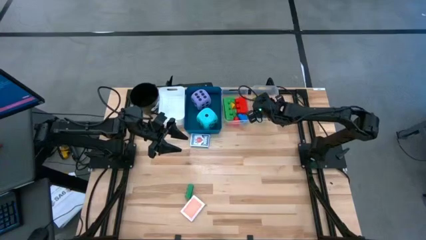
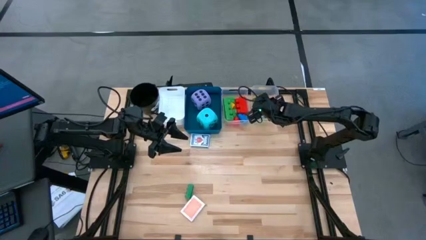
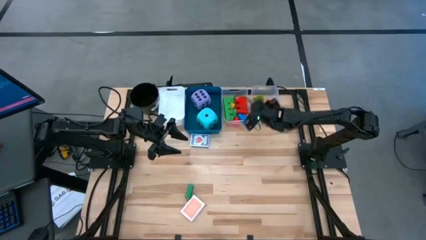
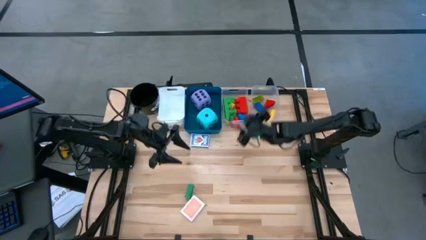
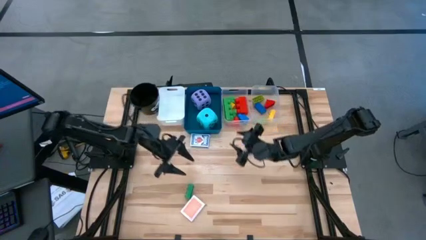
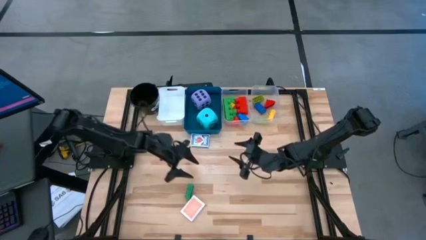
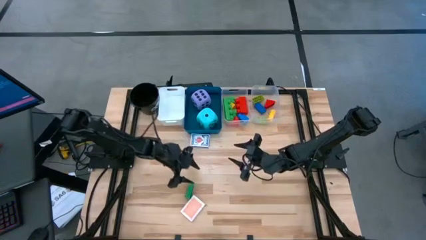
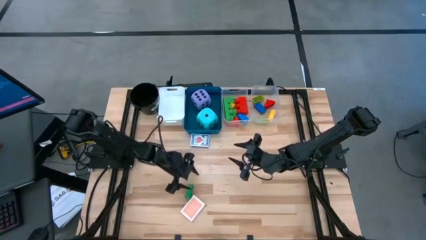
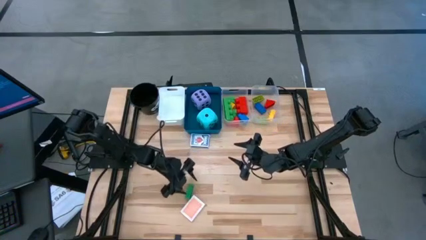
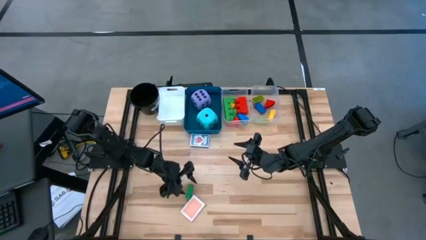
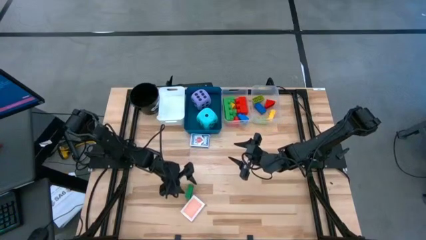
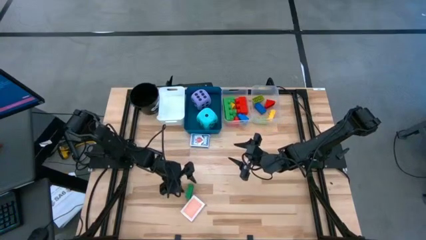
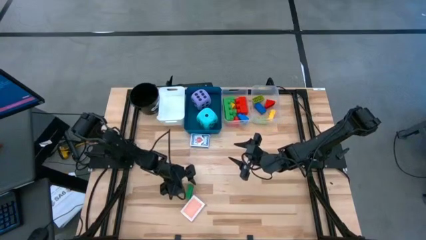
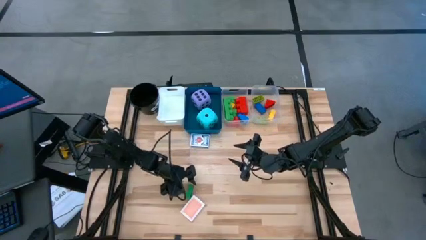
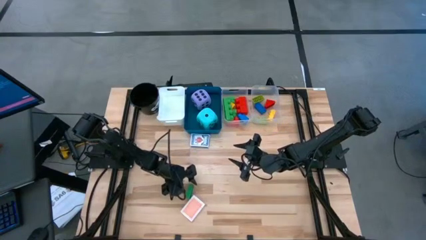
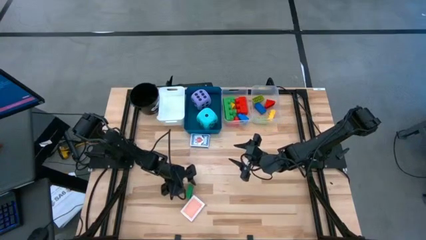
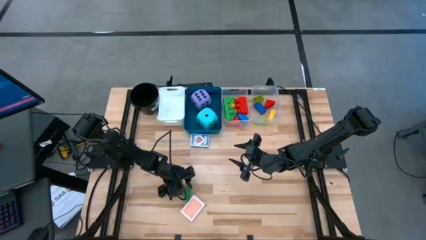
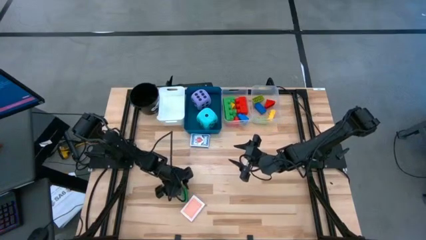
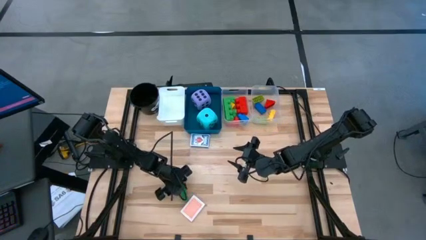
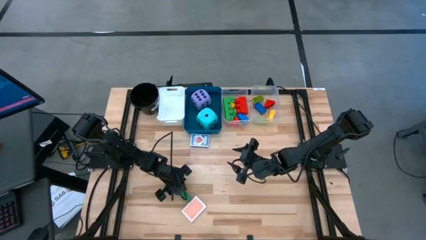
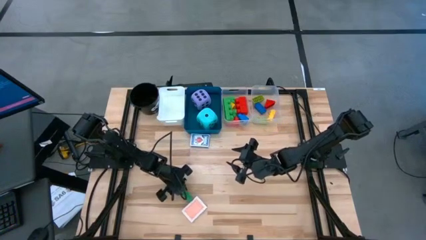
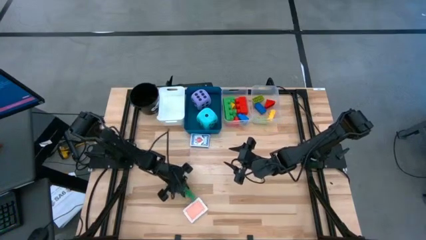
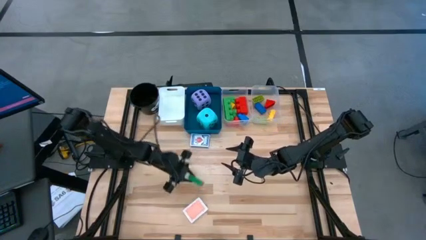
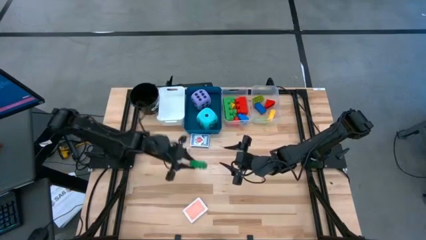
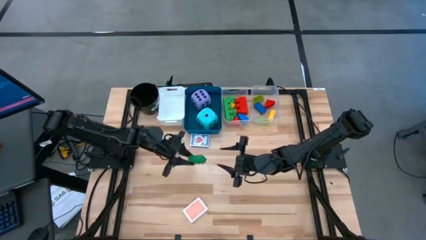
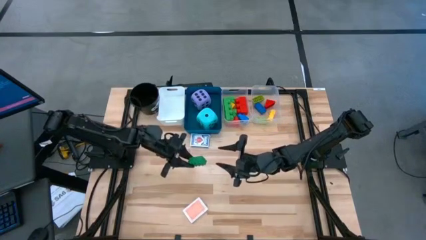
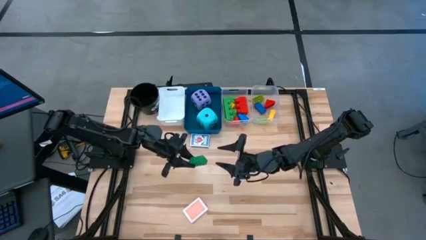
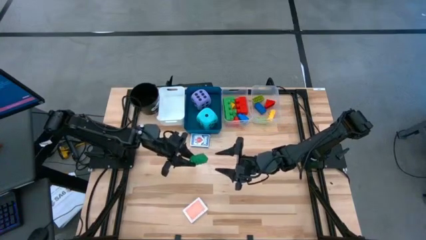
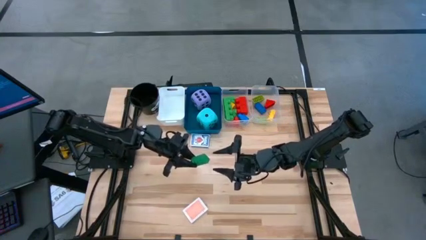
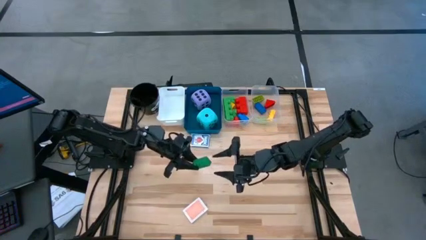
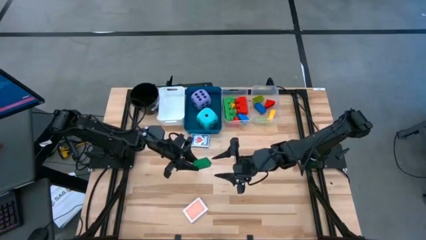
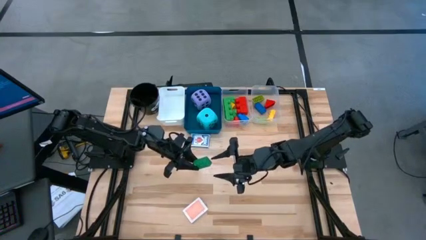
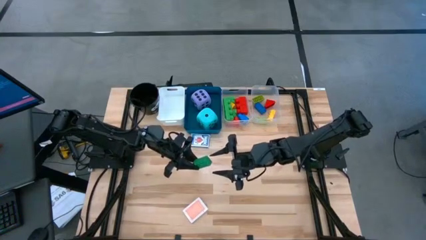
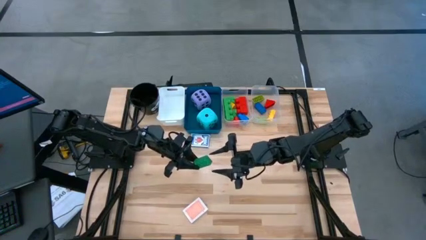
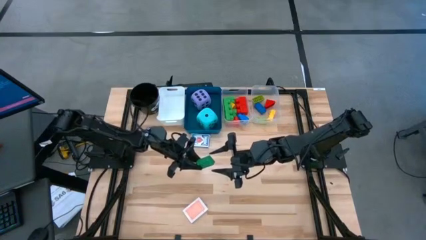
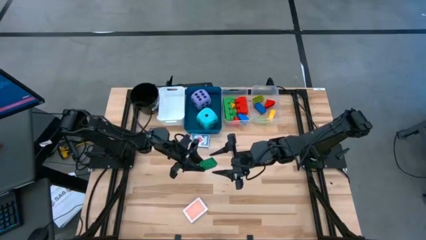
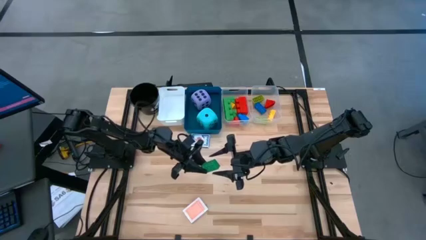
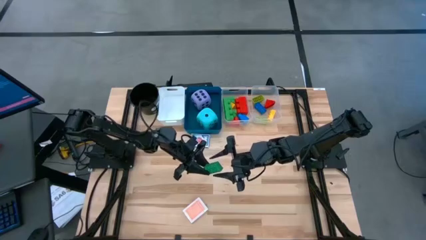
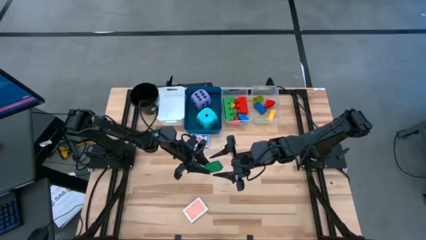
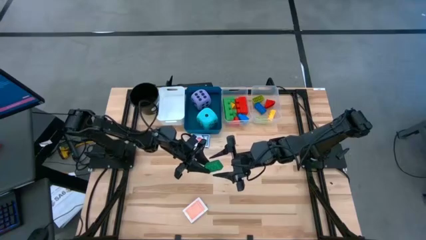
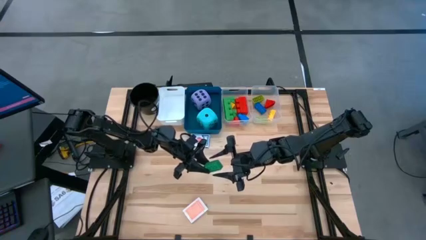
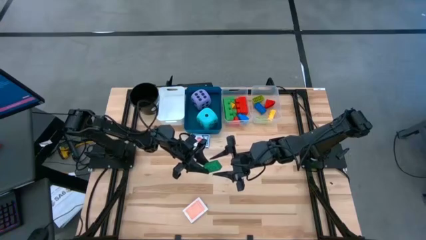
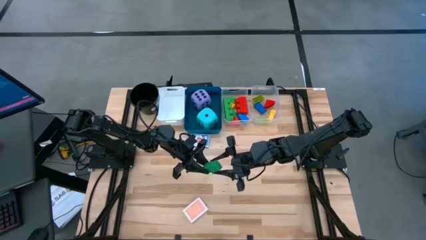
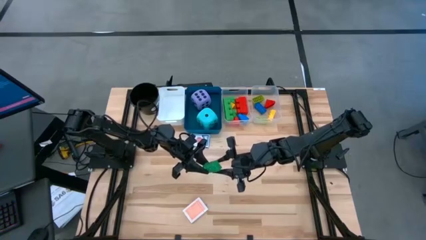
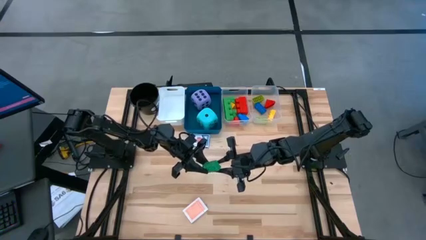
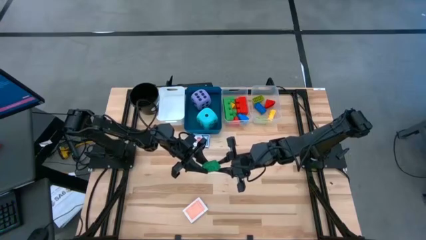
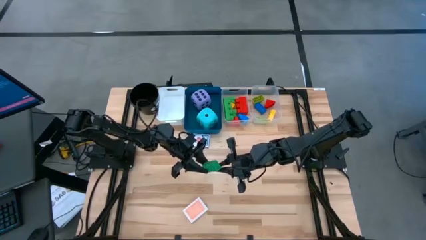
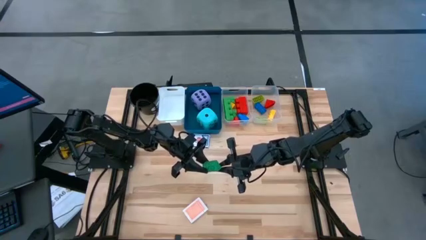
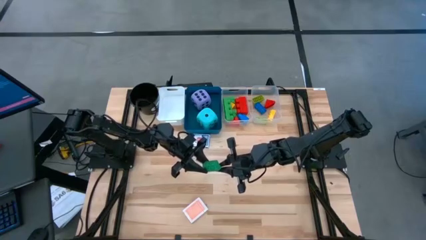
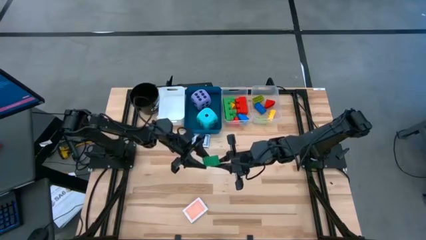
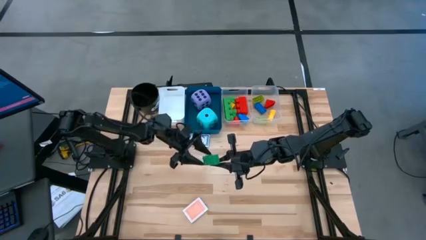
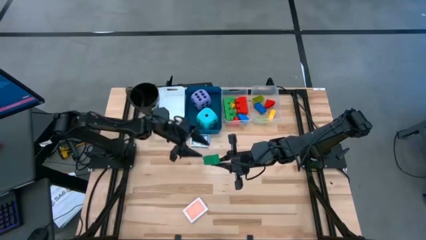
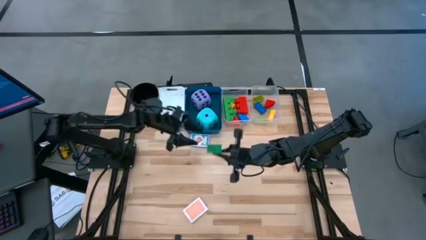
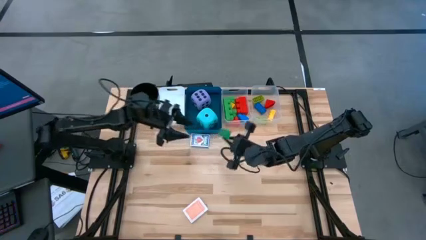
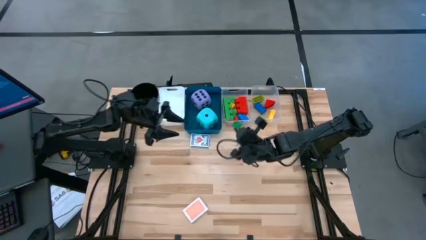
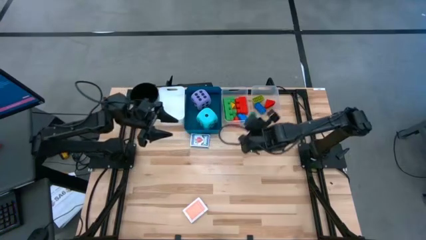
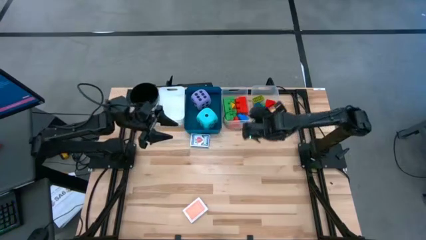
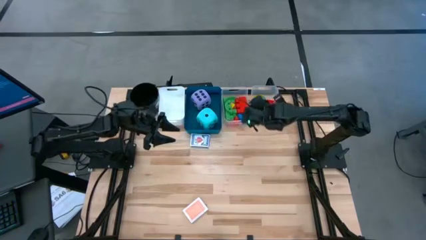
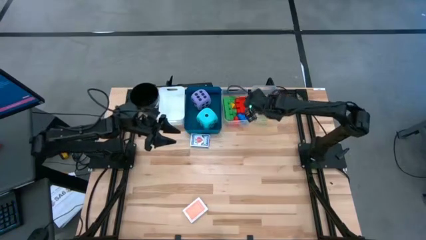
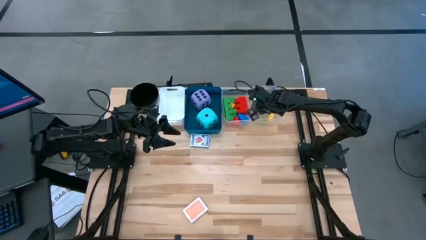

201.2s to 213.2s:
Task: Pick & Place Toys
Put the green 8 stud game piece into the right transparent bin
